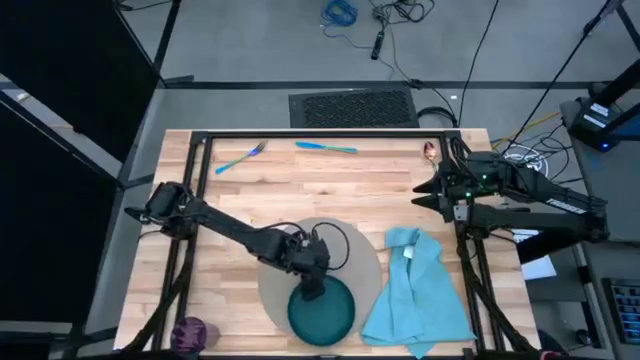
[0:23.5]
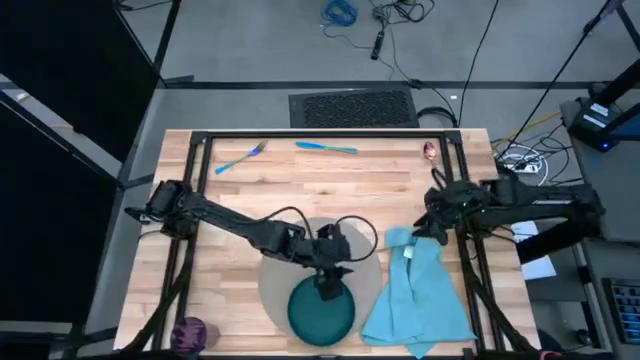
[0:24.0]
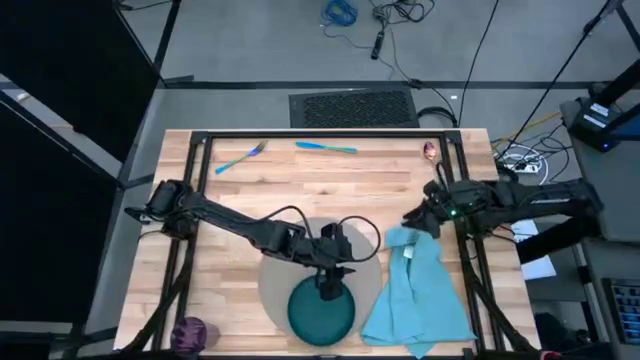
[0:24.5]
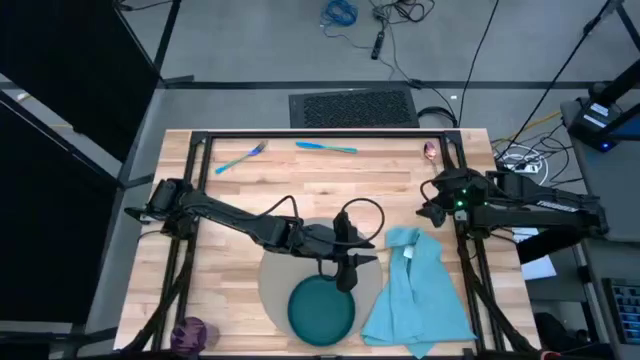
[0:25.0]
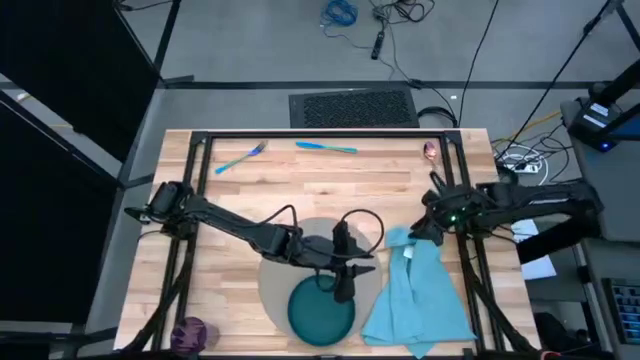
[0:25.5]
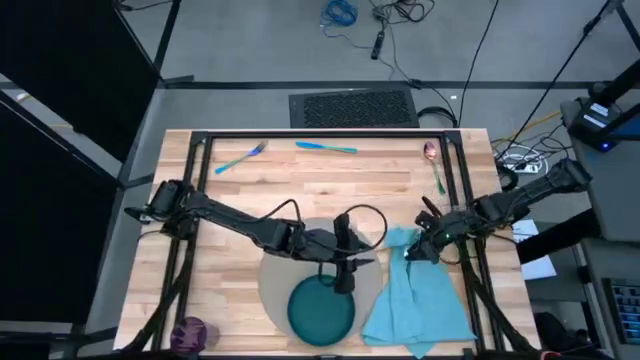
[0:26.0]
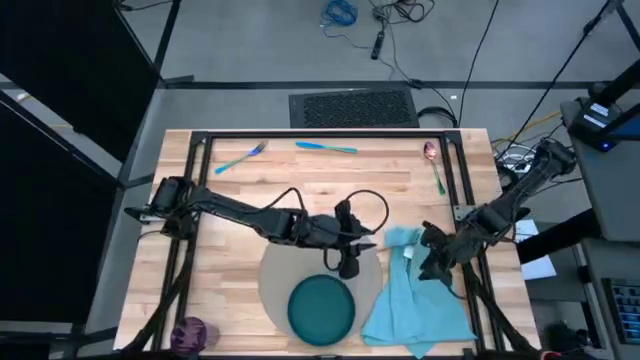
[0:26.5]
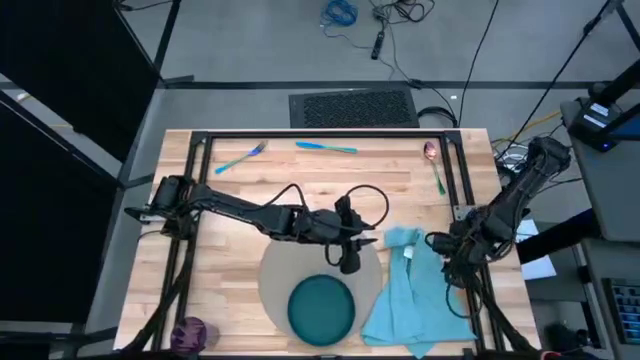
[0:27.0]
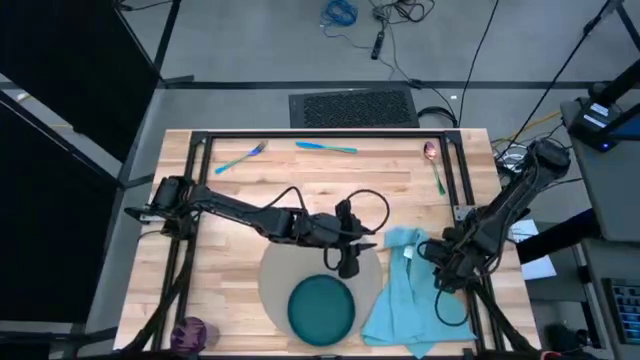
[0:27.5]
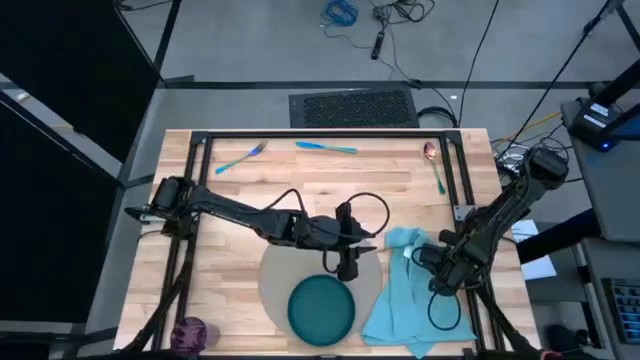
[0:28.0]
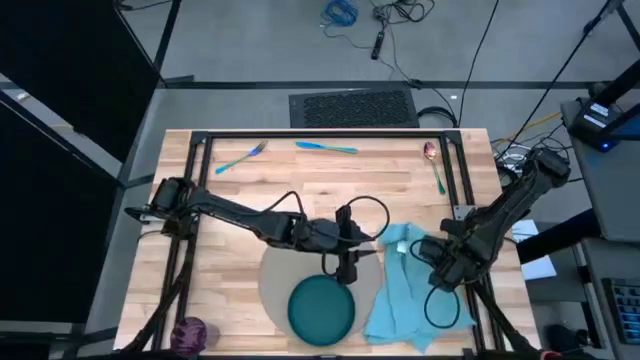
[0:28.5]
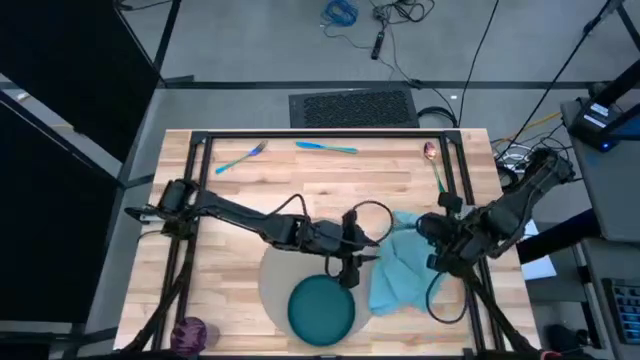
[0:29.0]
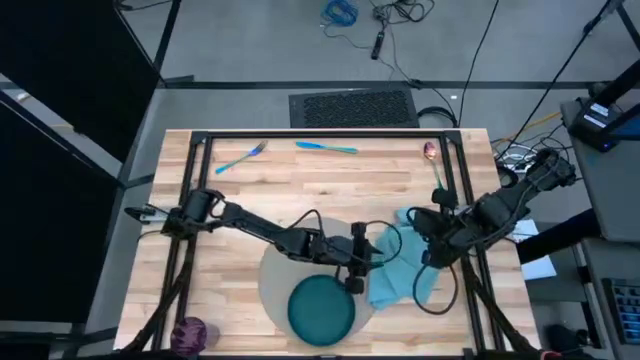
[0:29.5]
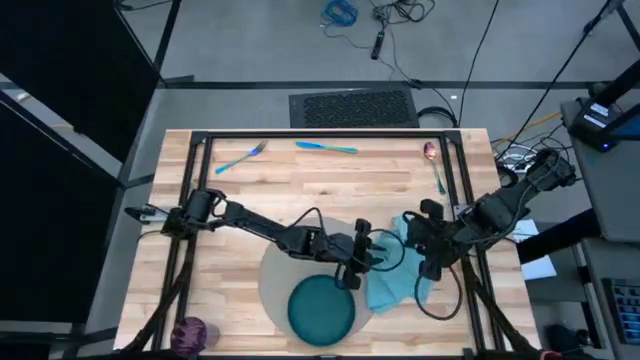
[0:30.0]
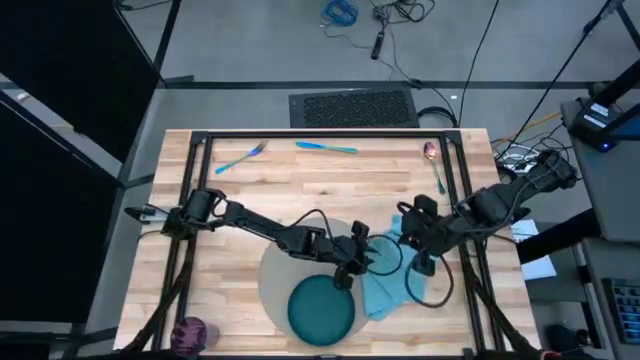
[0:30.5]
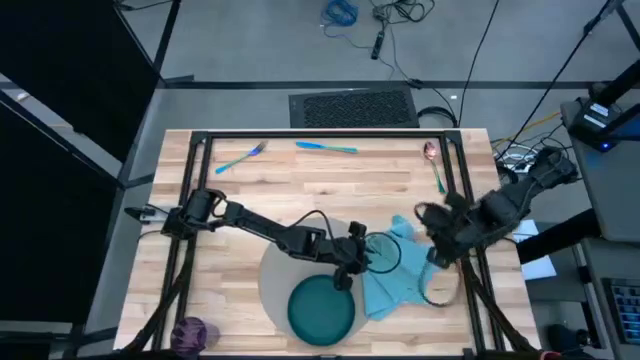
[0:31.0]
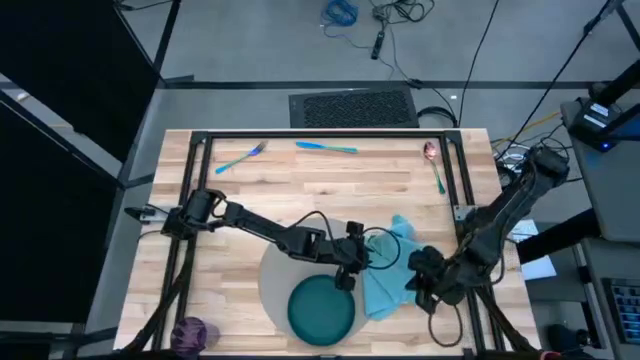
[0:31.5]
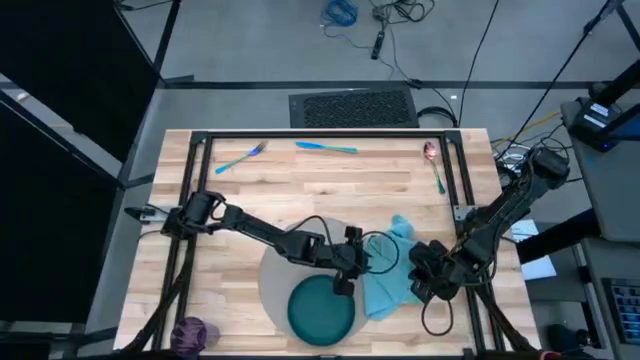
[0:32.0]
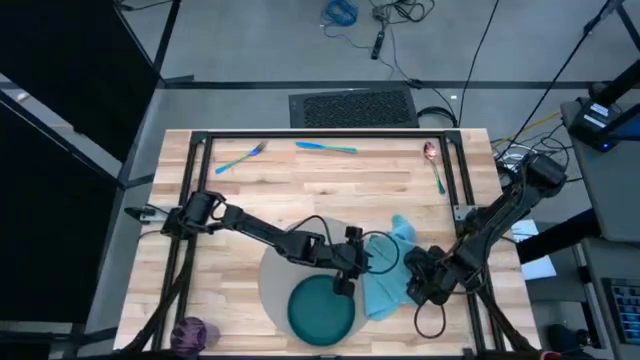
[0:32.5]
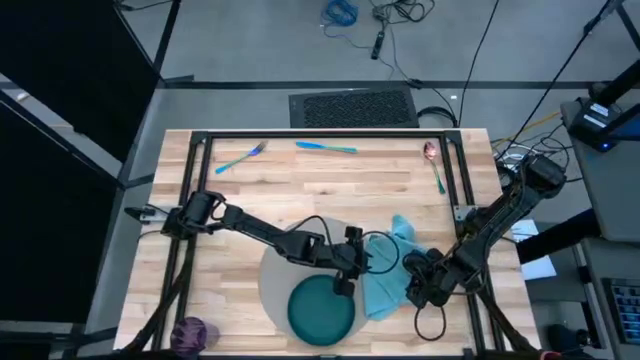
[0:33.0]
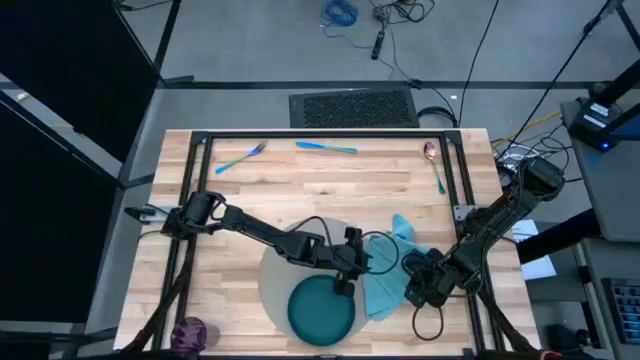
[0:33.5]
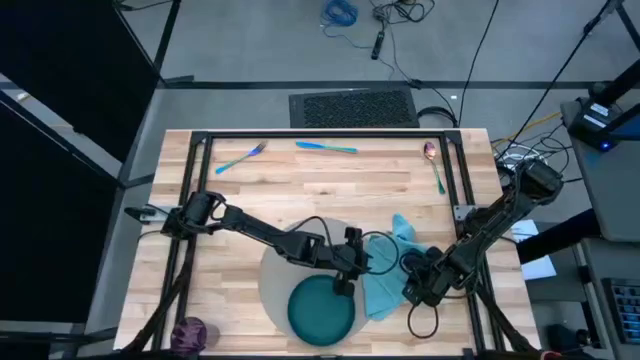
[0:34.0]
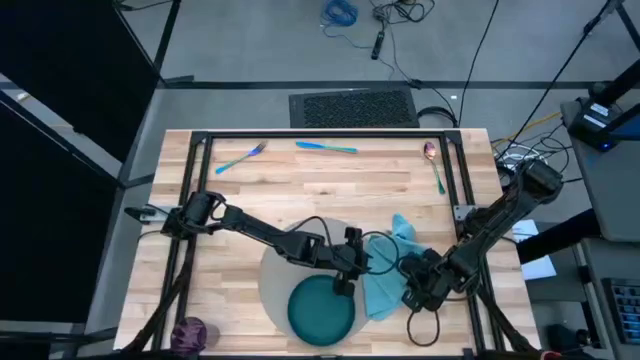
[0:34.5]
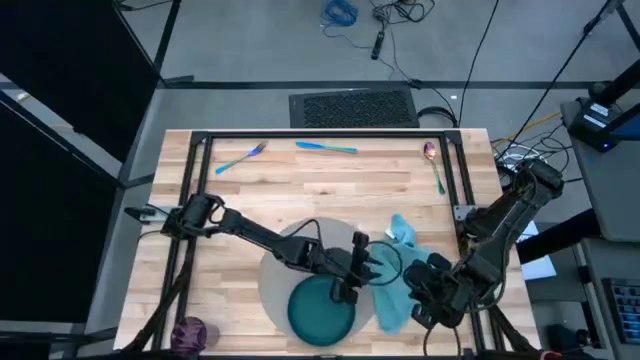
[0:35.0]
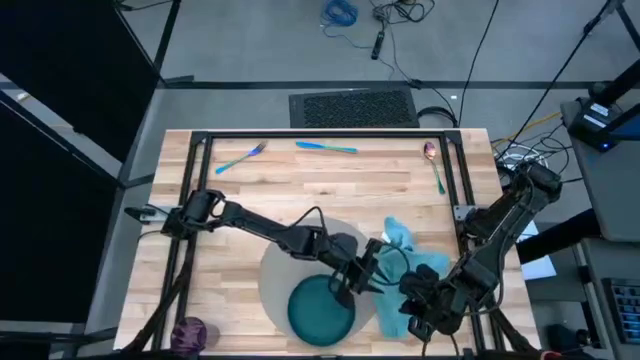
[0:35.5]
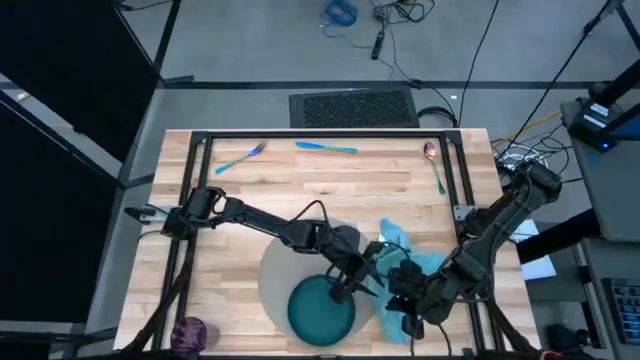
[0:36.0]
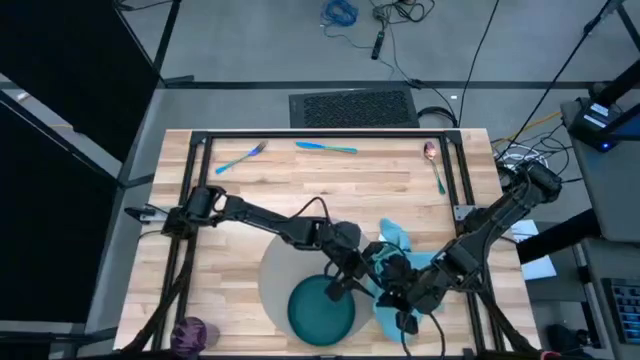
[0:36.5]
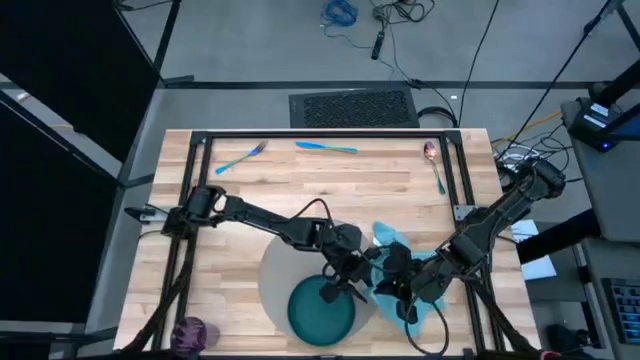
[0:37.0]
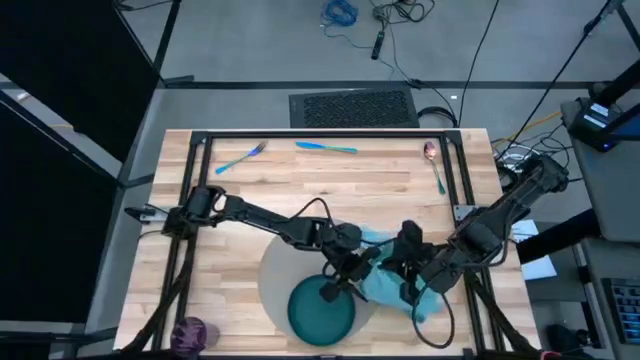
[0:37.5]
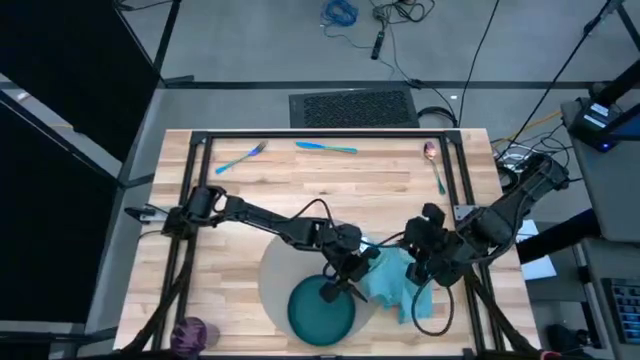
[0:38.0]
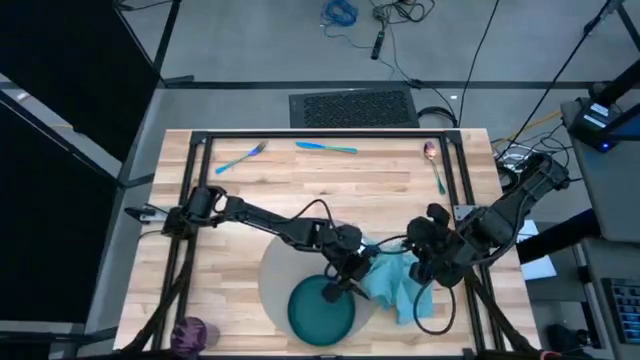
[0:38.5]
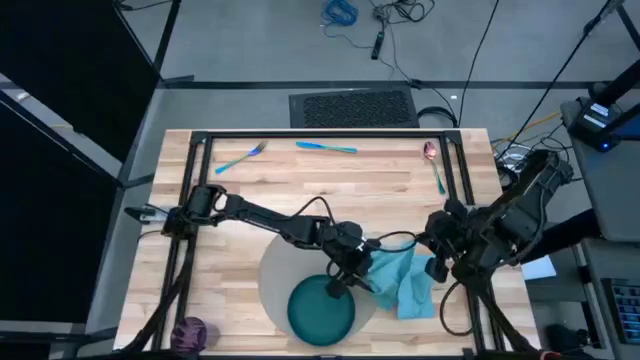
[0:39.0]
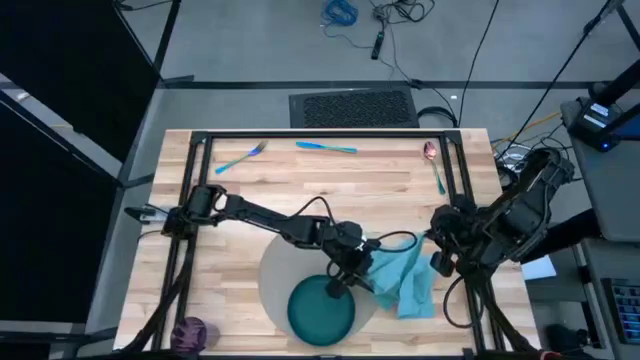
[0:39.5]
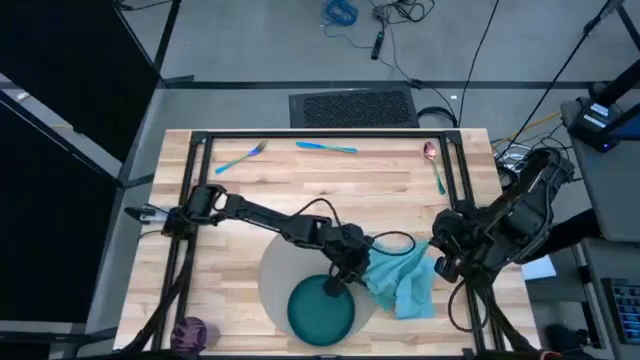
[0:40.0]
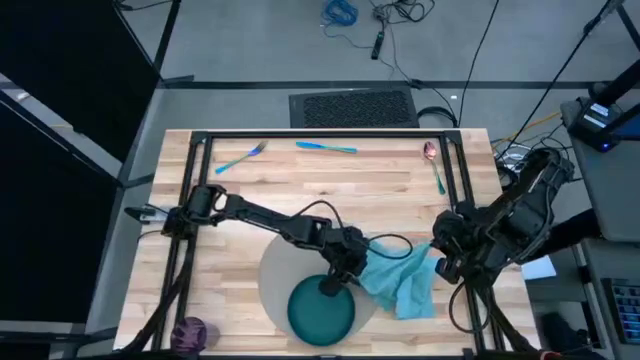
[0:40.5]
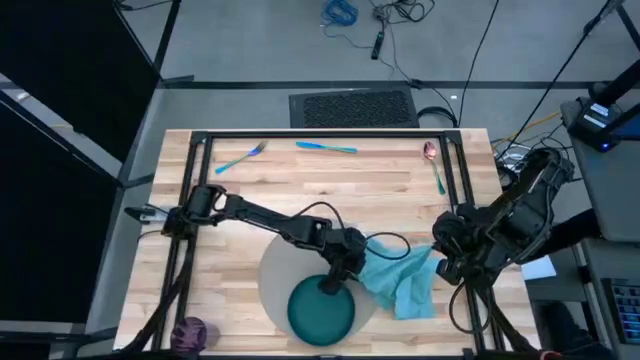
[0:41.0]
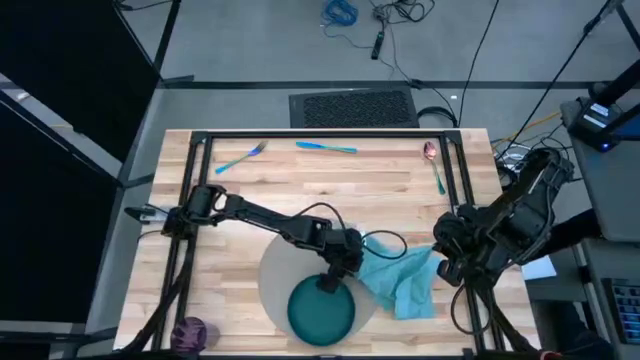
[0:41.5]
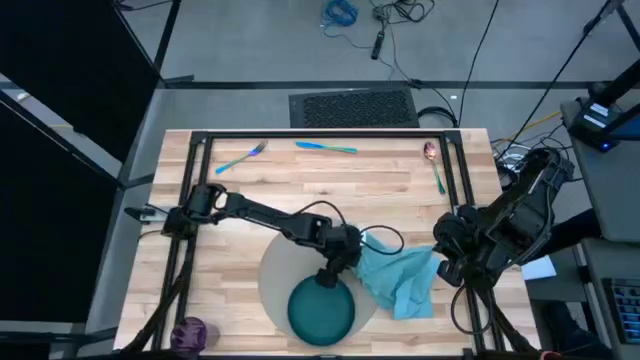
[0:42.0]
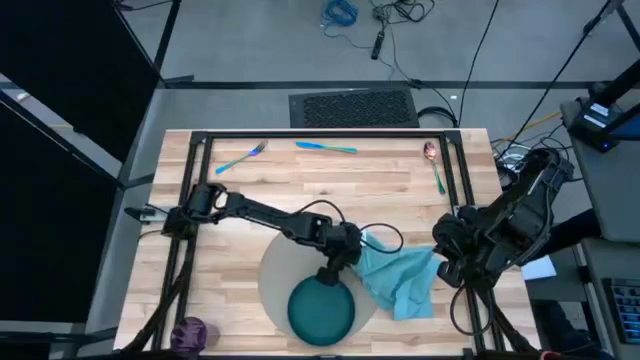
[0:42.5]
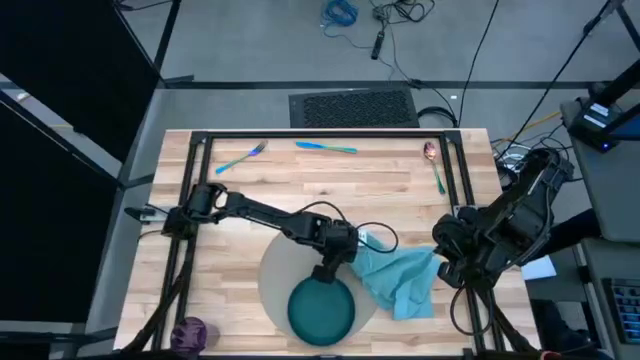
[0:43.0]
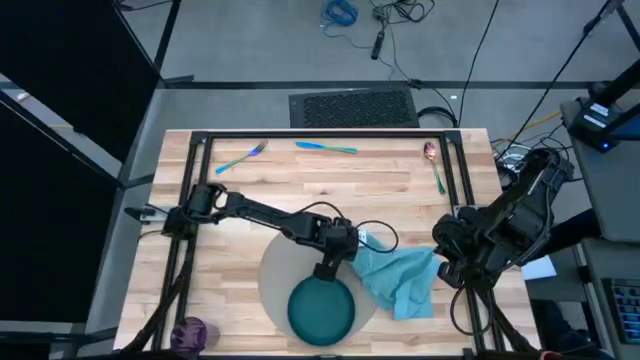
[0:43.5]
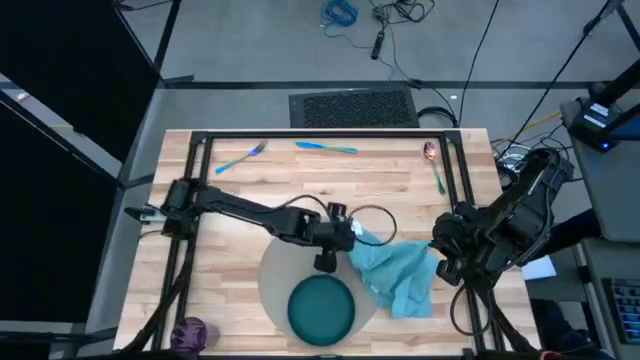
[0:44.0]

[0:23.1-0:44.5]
Task: Set table place
Fold the blue napkin
